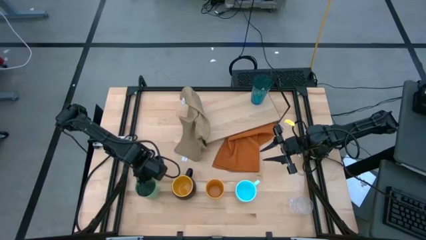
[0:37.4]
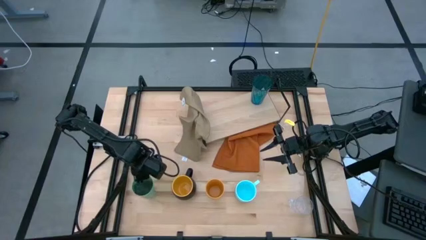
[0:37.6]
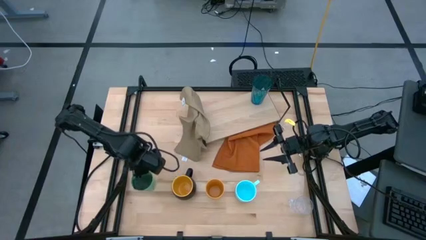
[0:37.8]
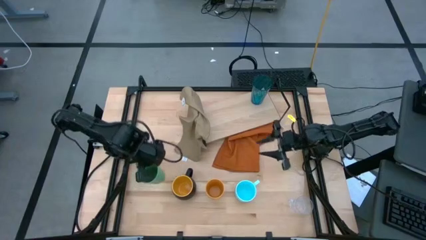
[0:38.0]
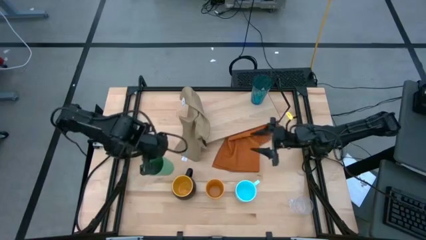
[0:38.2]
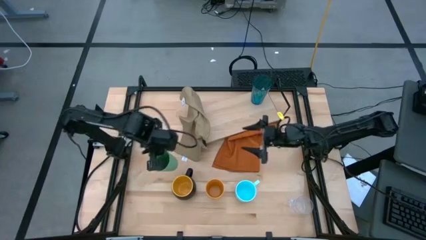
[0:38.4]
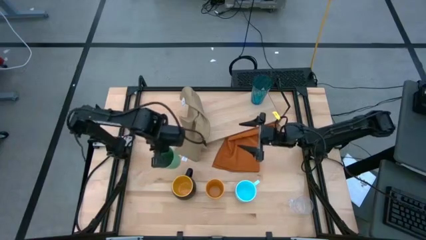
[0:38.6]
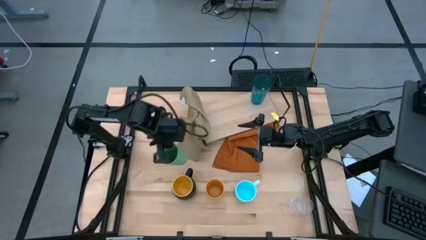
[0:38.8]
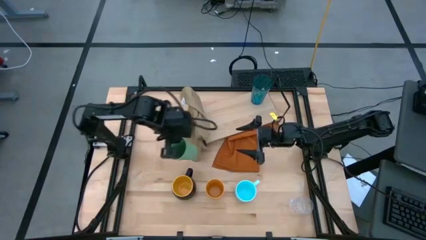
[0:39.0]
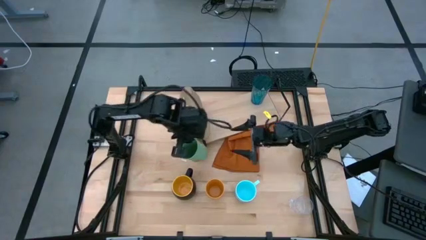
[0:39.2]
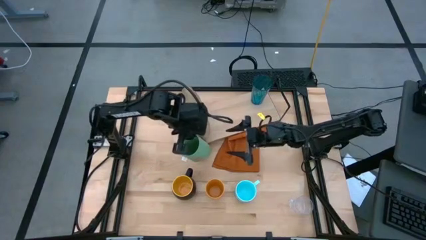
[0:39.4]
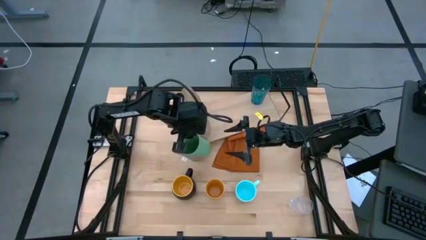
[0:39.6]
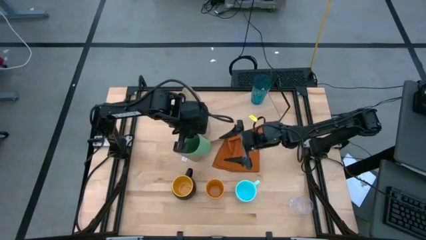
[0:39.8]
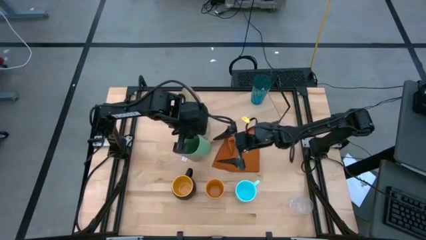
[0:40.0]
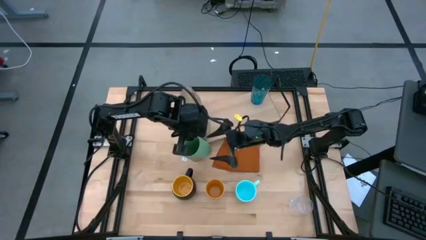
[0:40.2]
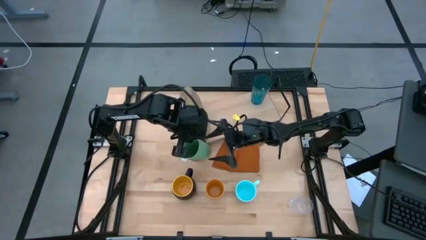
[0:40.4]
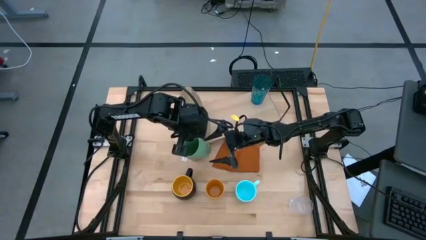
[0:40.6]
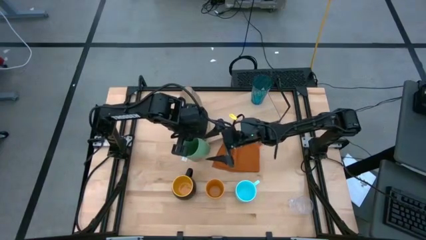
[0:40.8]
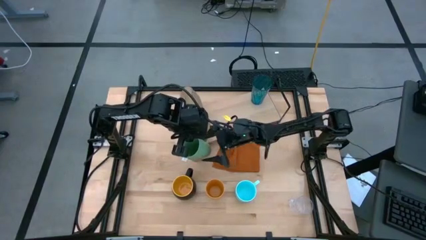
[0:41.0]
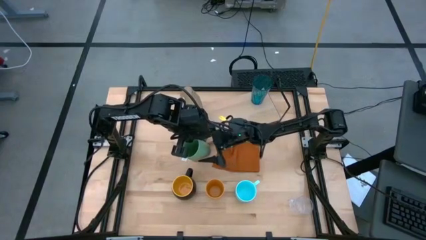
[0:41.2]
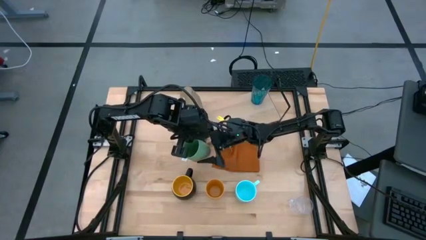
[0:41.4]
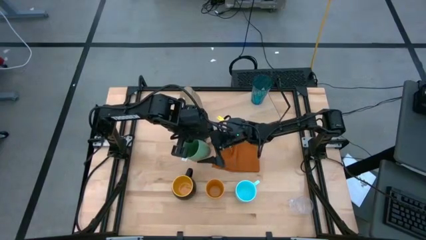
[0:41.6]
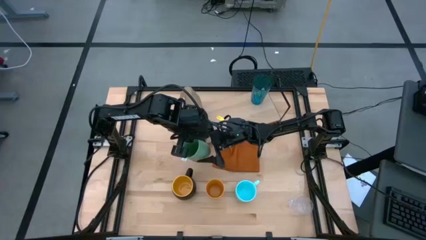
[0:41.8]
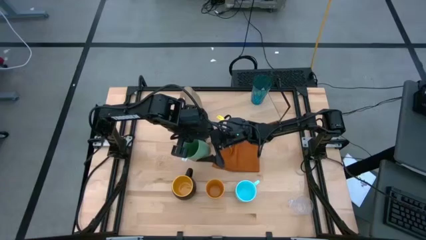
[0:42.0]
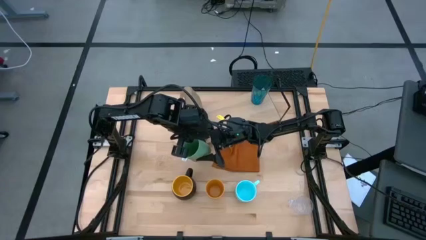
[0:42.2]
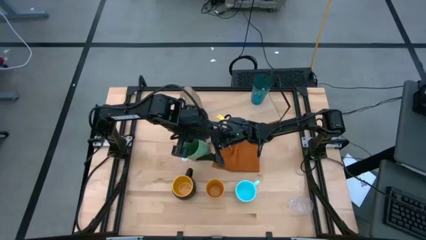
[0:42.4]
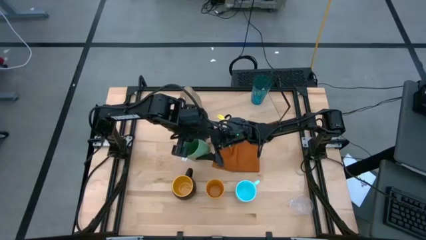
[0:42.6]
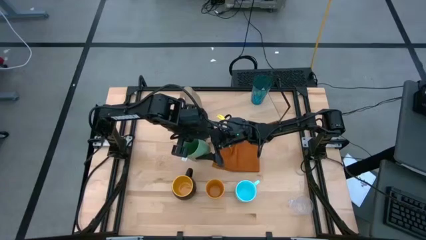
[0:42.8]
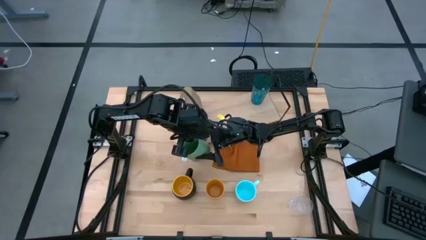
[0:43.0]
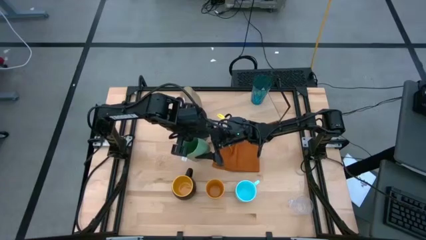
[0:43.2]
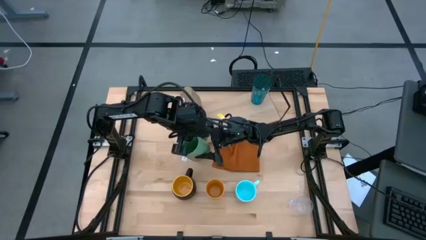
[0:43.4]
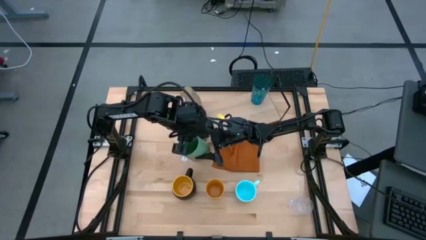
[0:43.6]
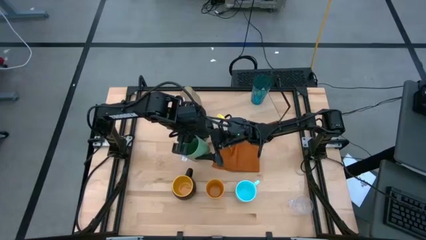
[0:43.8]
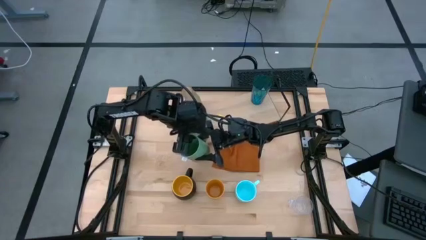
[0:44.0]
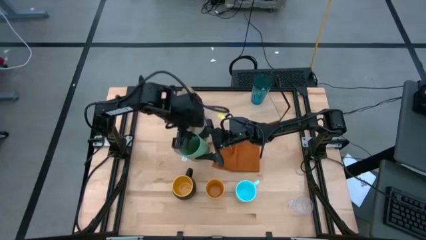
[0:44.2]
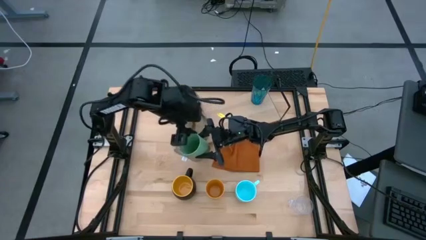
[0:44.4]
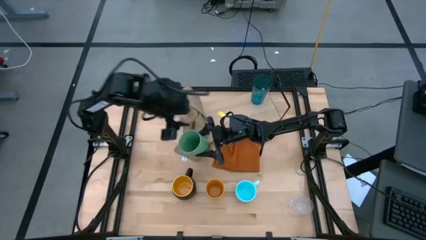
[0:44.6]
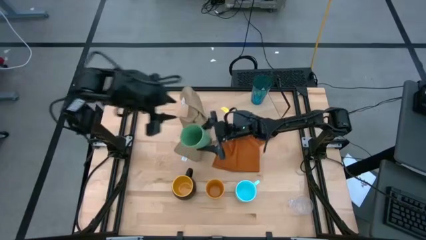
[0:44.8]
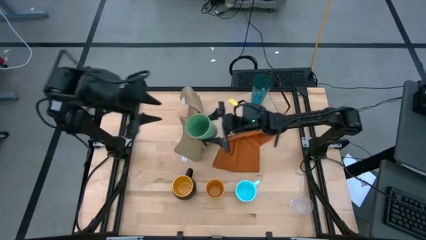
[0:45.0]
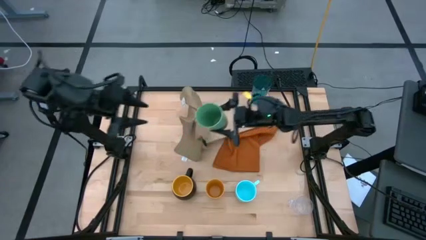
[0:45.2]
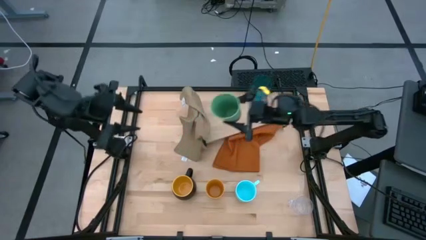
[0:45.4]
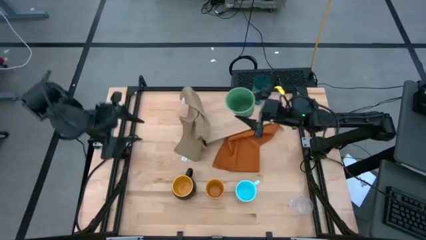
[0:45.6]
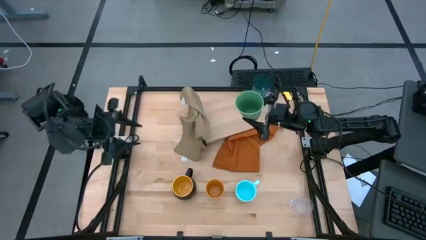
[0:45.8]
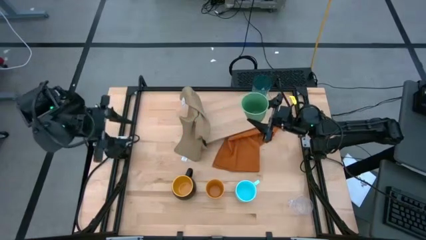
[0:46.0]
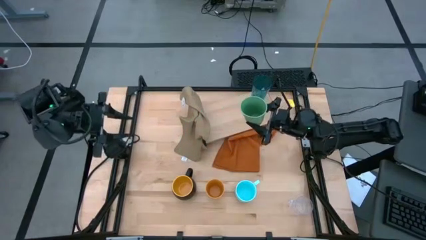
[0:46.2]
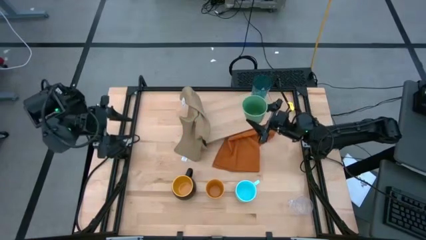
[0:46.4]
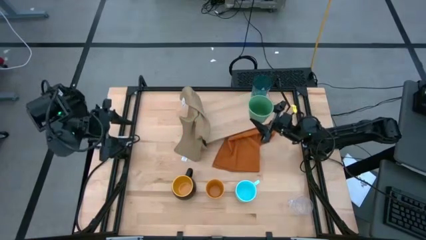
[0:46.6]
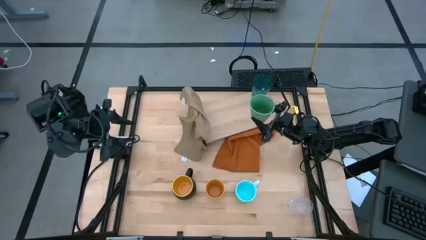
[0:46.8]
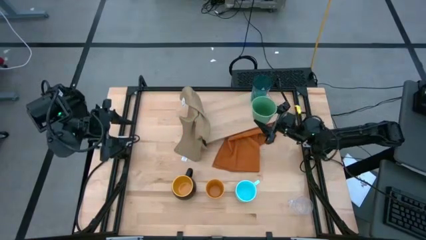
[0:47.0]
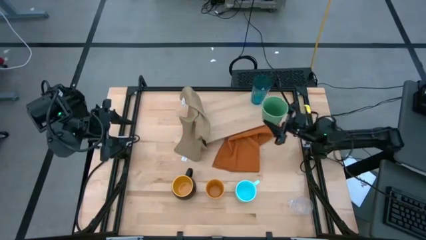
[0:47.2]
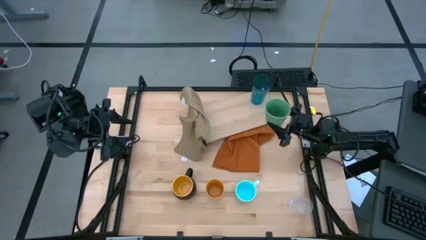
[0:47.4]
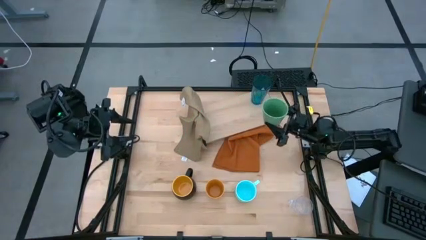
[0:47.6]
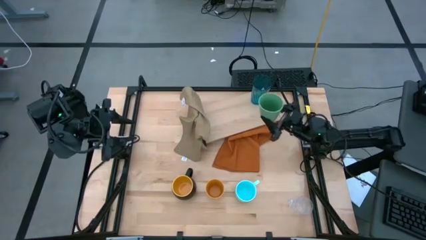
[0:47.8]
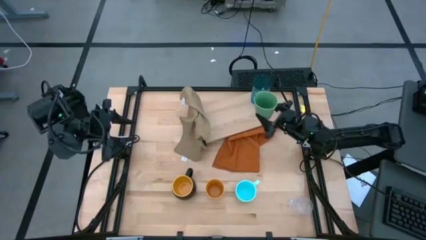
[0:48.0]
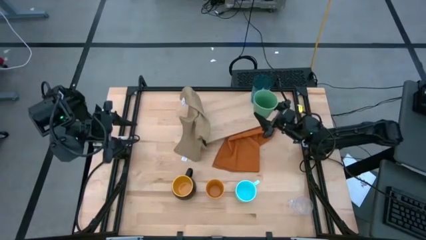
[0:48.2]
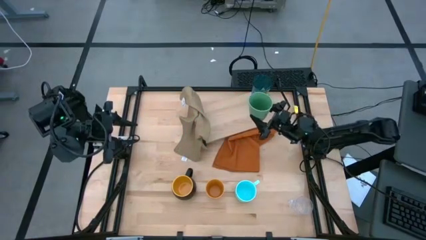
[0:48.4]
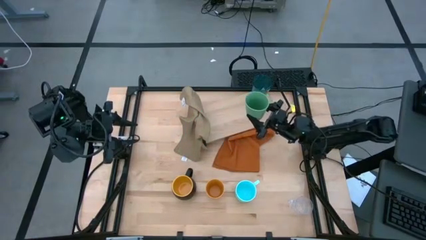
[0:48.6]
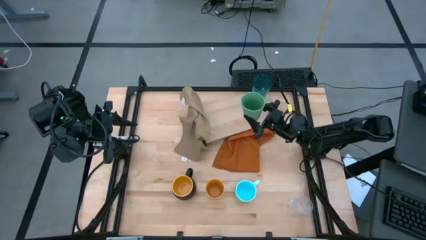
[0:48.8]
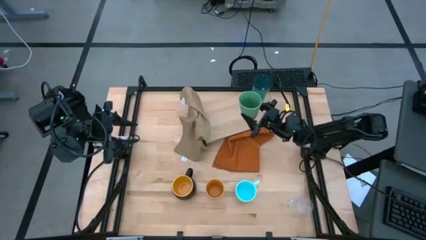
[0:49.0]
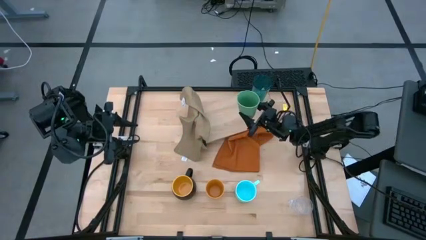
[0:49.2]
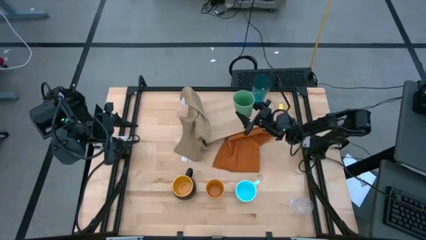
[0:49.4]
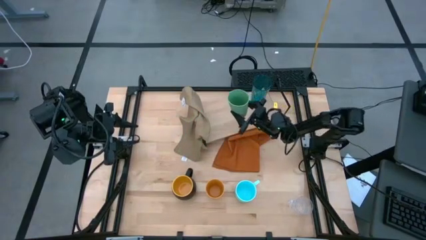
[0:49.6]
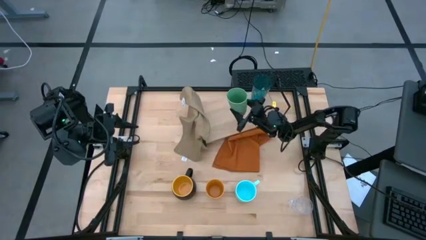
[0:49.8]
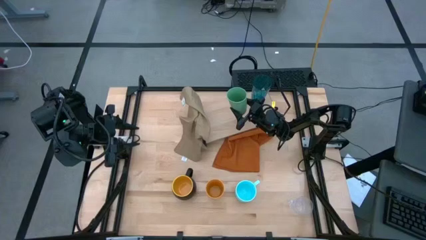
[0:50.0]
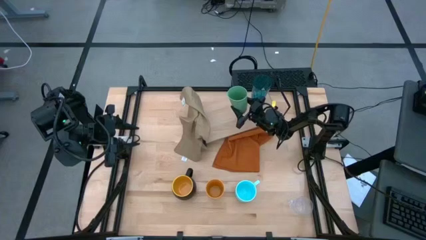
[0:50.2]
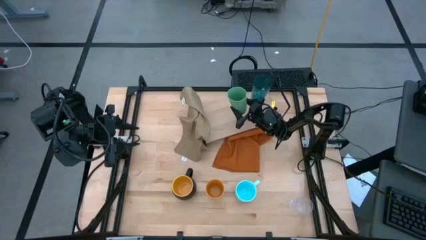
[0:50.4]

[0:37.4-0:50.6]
Task: Stack small to large cups/mugs on shelf
Put the green cup on the shelf
